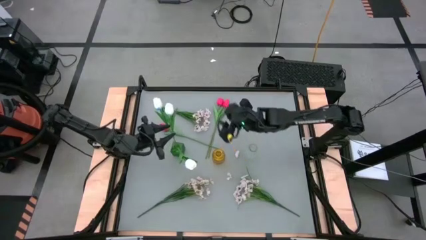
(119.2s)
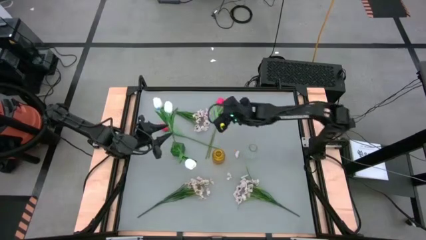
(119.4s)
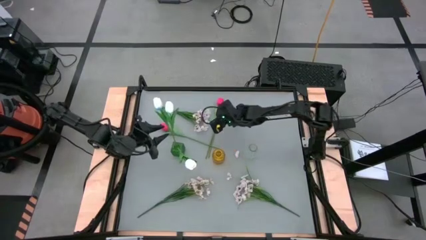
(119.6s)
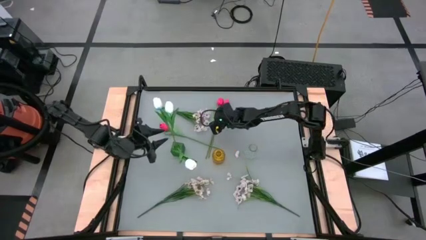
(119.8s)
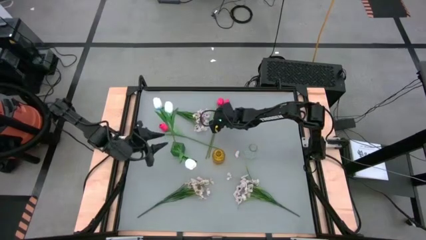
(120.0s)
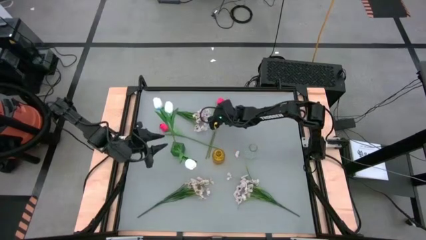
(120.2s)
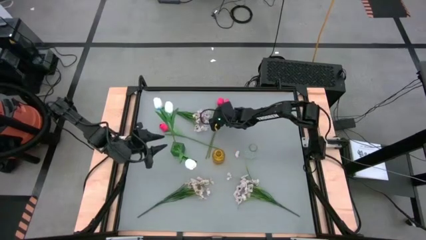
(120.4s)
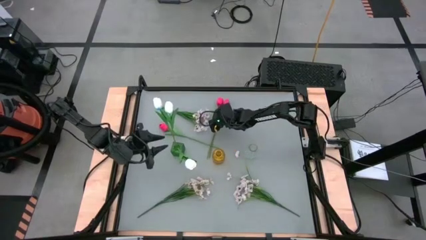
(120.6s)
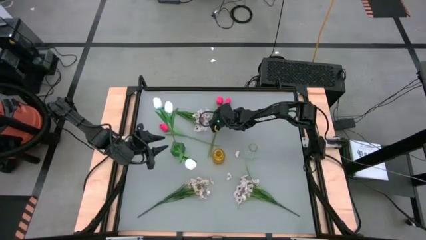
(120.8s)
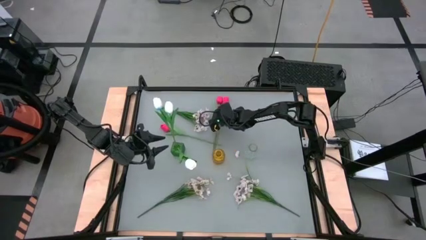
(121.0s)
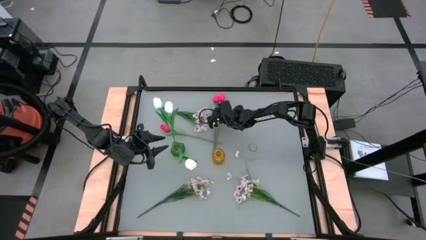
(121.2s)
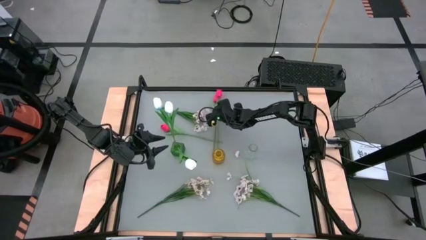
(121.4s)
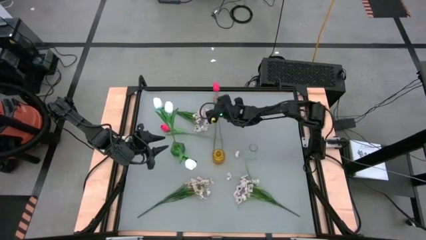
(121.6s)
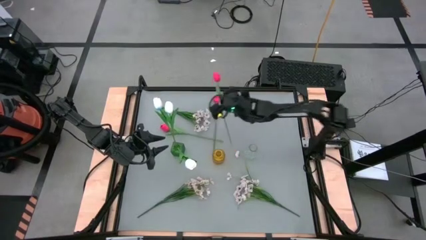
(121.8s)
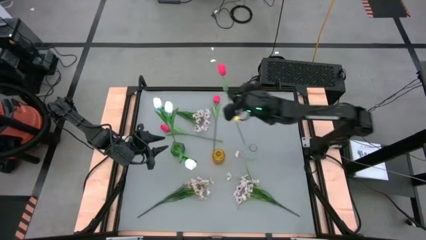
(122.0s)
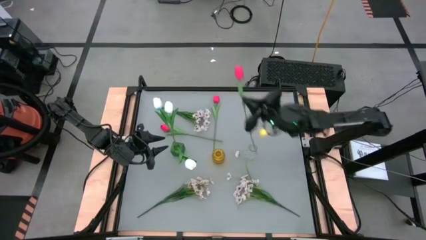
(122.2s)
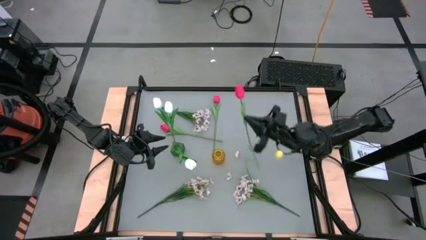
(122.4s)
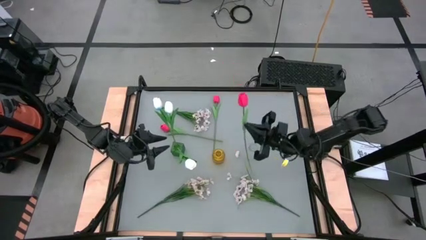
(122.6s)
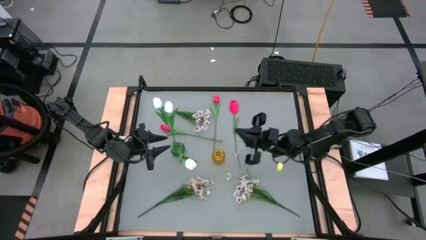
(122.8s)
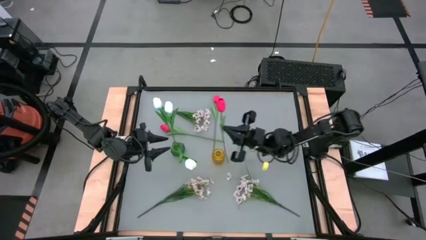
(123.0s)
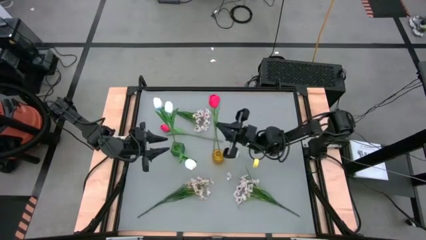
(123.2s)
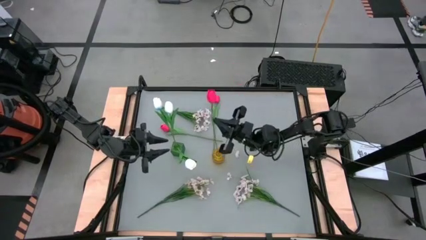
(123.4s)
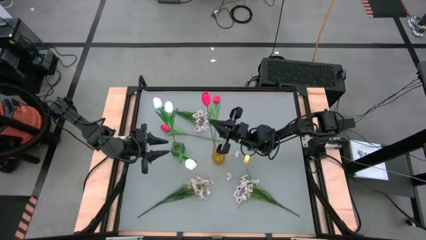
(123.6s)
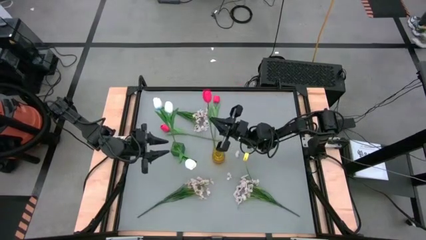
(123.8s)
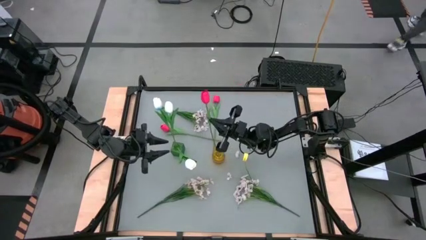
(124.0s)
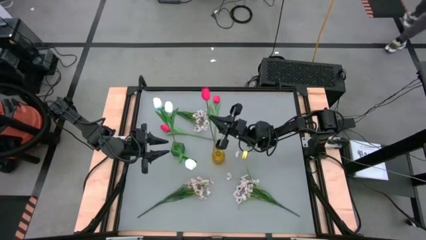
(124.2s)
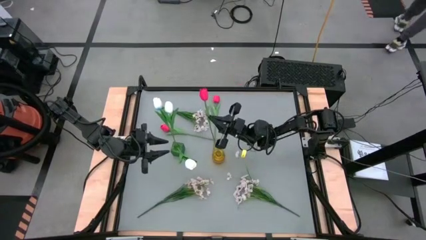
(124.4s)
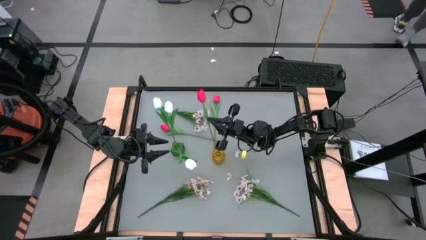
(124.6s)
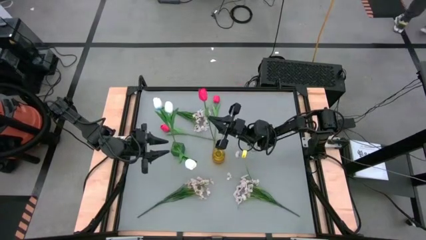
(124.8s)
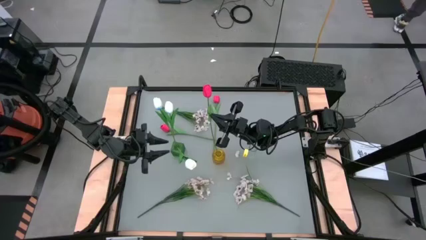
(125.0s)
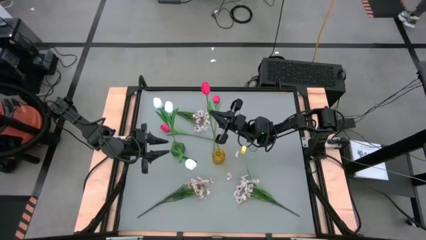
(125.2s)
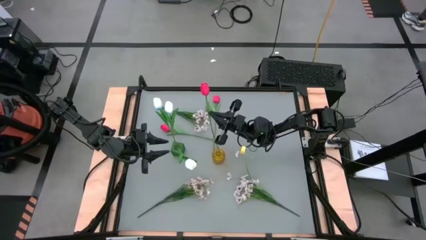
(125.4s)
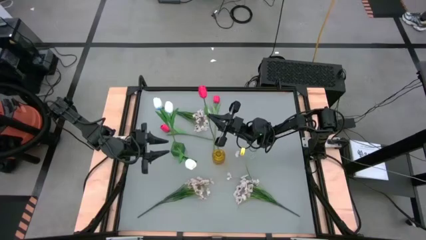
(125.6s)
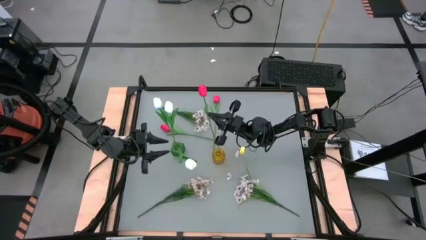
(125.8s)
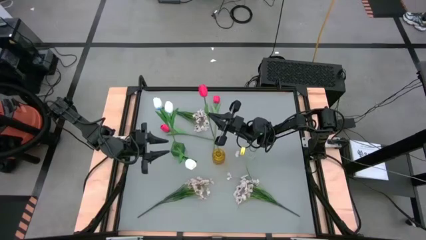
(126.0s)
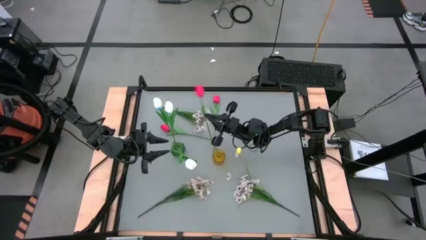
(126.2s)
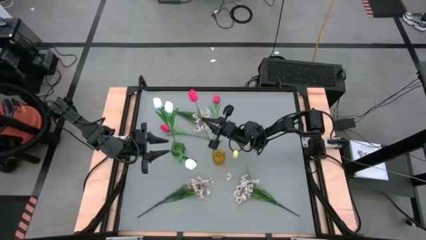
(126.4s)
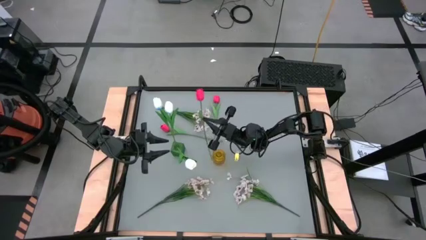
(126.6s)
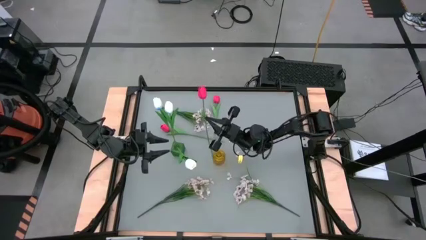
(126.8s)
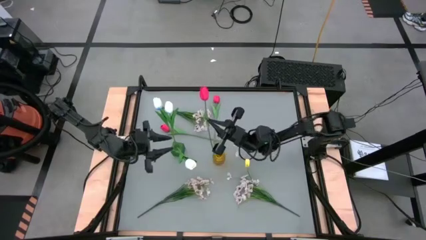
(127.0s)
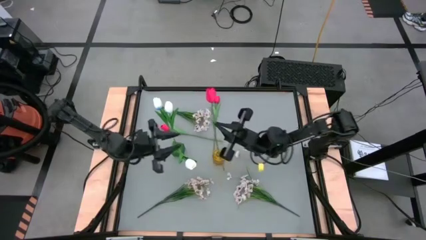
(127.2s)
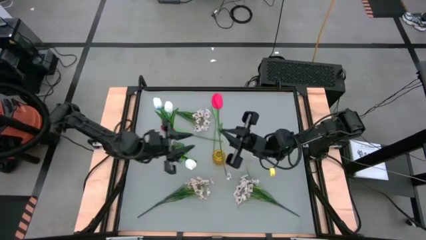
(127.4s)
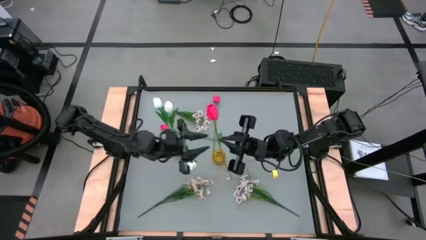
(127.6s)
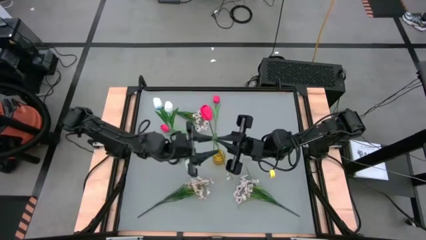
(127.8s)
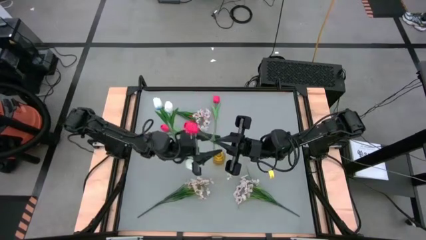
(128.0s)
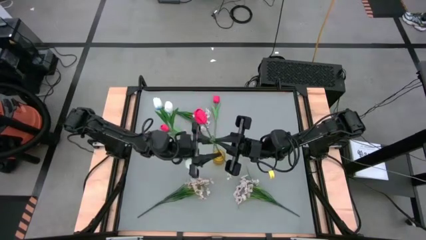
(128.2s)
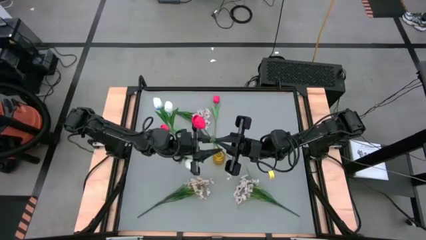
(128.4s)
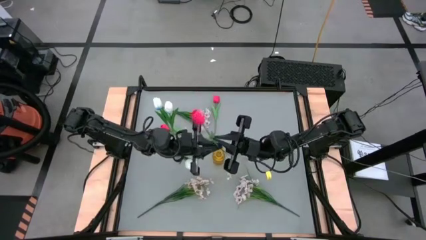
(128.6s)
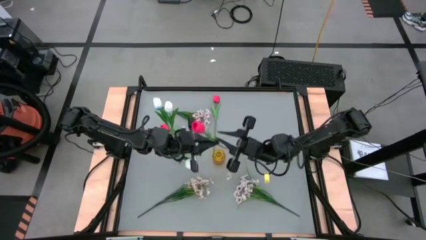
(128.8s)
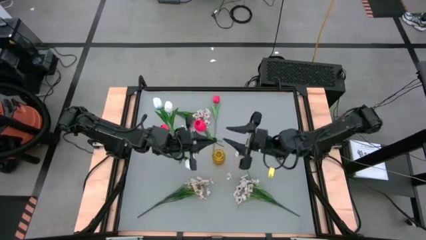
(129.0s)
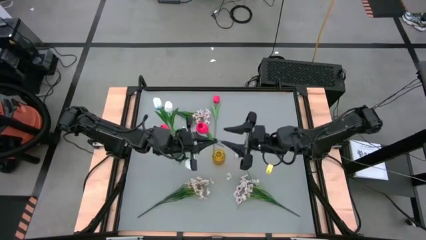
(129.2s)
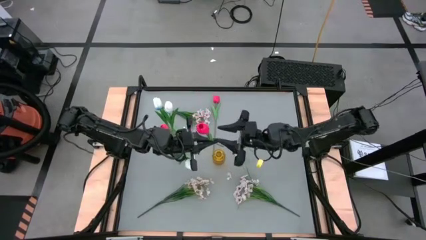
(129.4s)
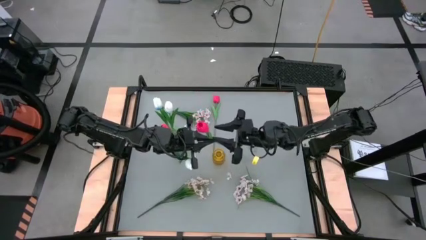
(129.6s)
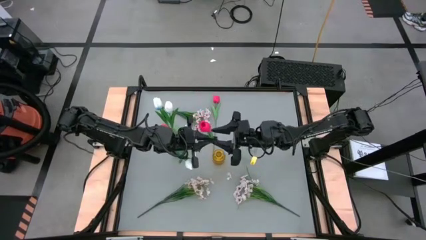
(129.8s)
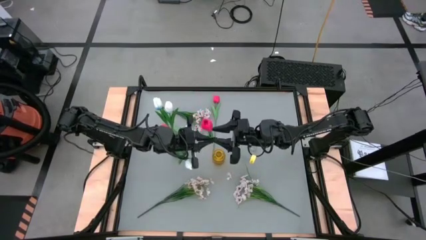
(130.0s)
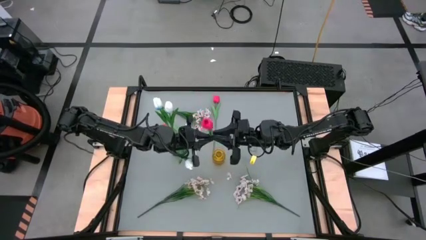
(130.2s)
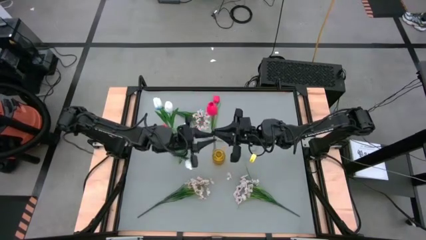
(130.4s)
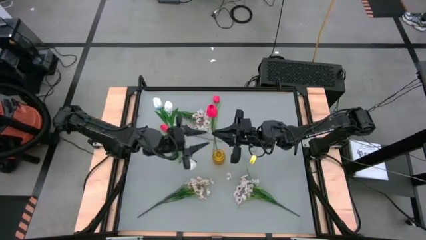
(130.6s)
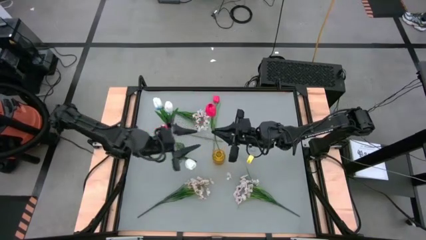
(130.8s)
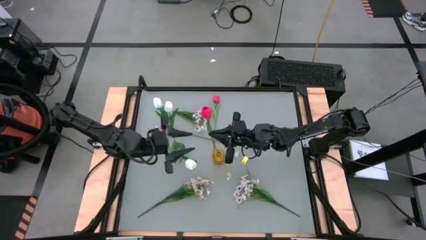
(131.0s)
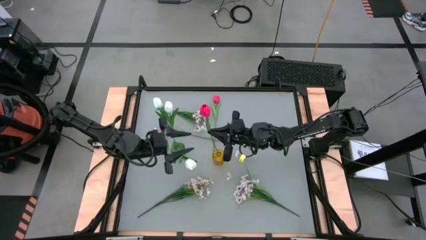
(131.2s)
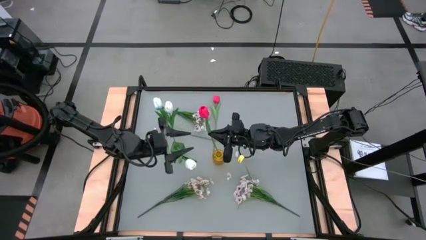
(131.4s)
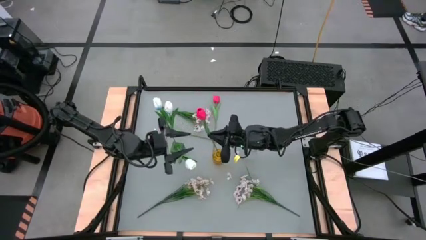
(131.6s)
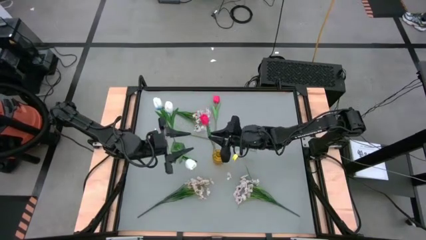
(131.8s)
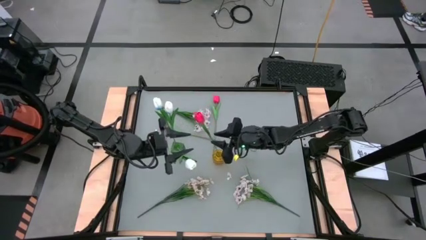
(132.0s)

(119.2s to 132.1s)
Task: Sort flowers into vase by color
Put the right pink flower into the yellow flower vase

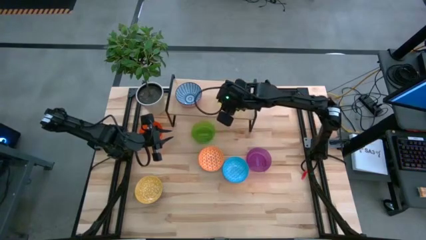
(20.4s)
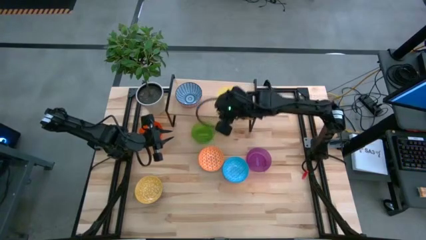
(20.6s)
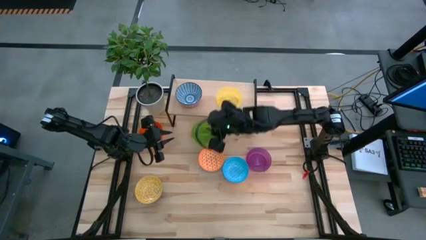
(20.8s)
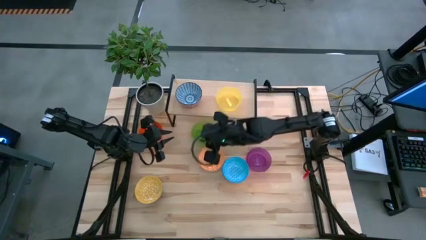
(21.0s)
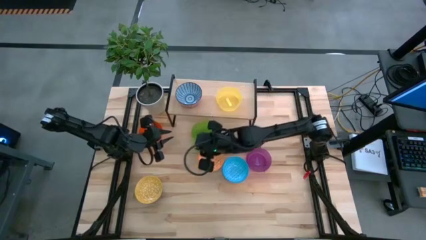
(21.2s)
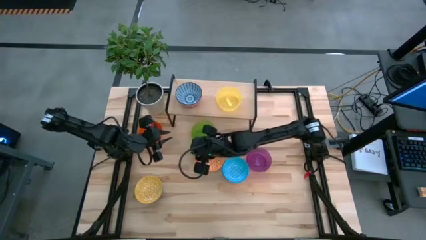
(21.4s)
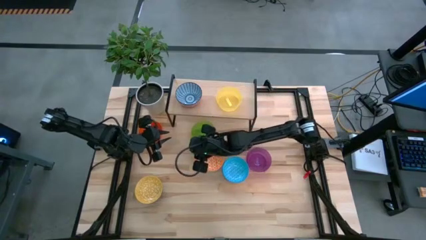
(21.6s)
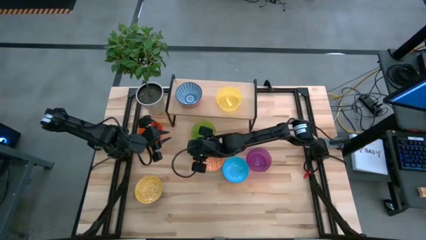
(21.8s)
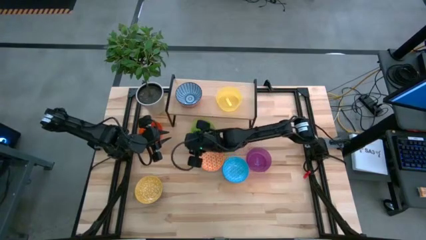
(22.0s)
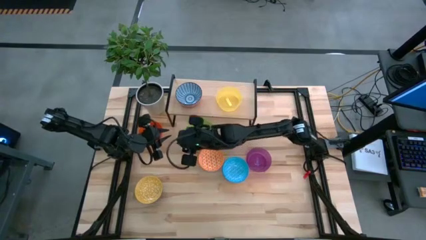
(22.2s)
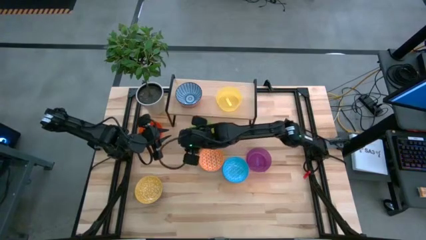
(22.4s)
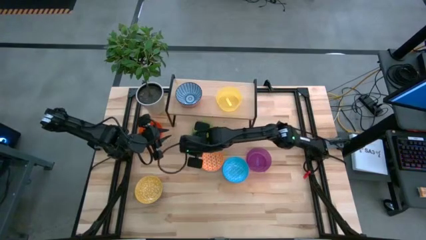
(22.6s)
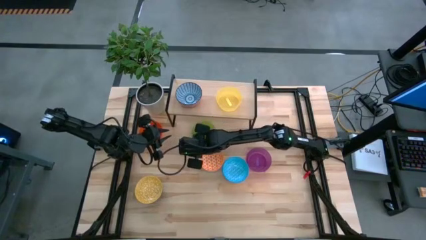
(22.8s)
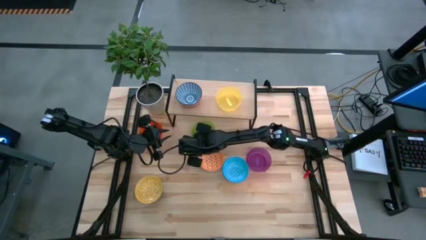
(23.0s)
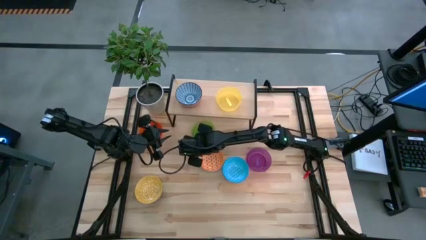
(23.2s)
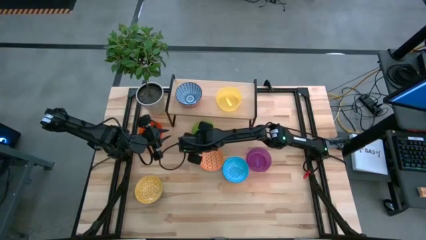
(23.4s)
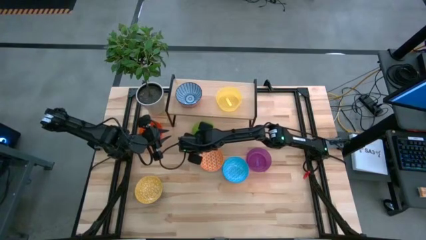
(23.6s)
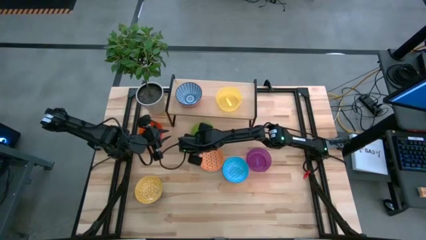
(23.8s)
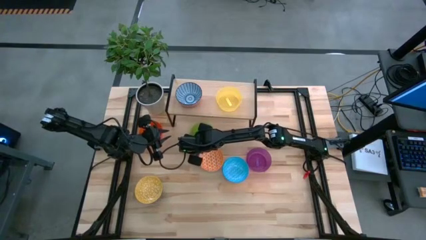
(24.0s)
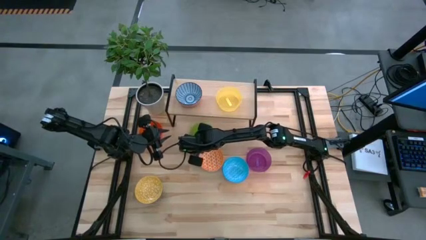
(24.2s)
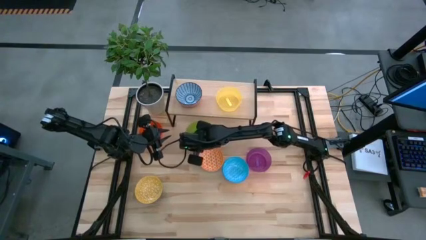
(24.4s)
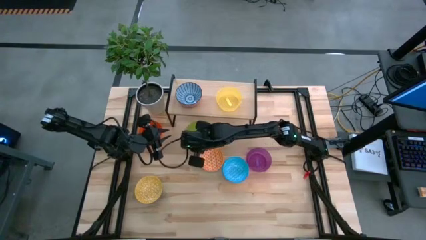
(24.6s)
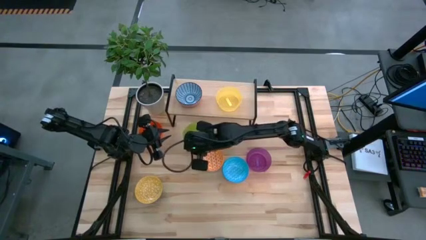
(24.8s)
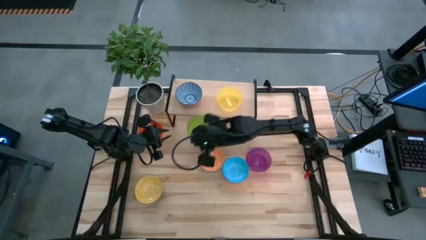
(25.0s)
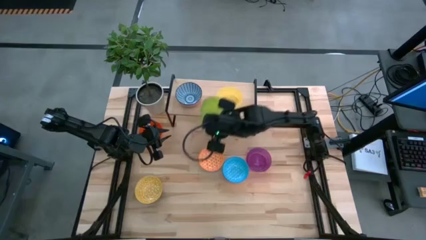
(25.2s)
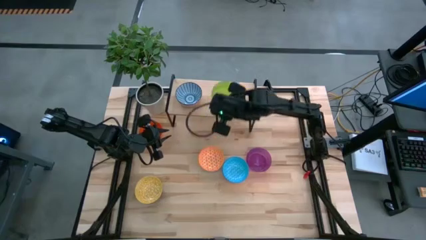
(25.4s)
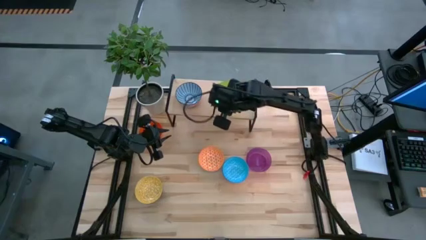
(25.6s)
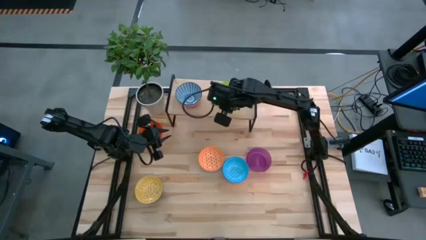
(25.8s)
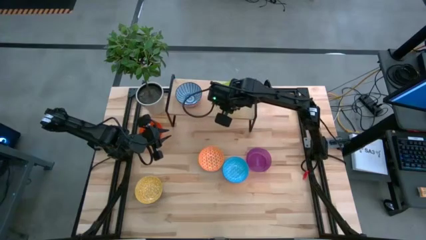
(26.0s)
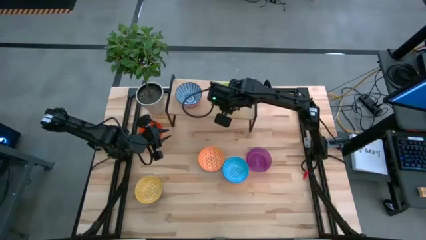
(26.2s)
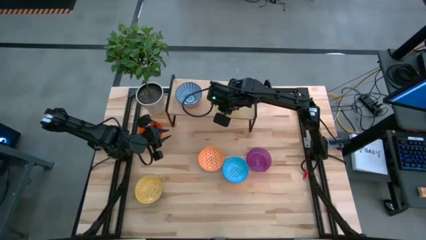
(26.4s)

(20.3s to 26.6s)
Task: Place and stack bowls onto a shelf
Stack the green bowl into the yellow bowl on the shelf
